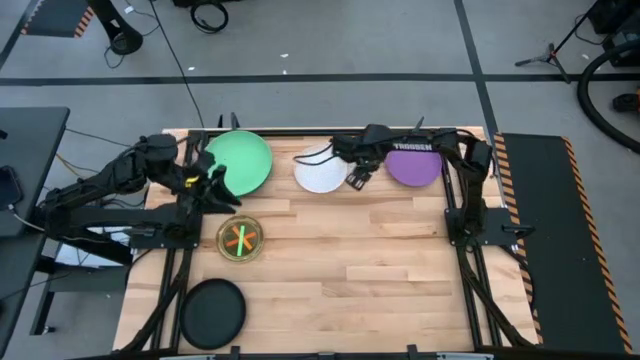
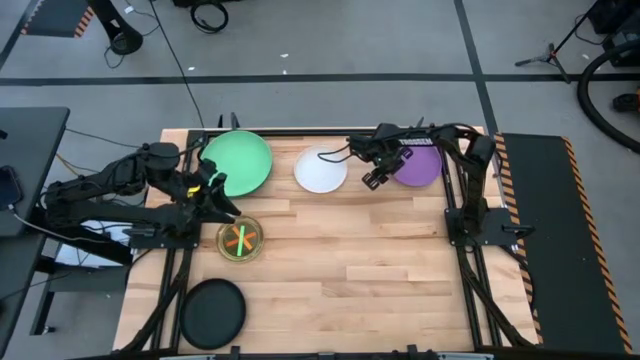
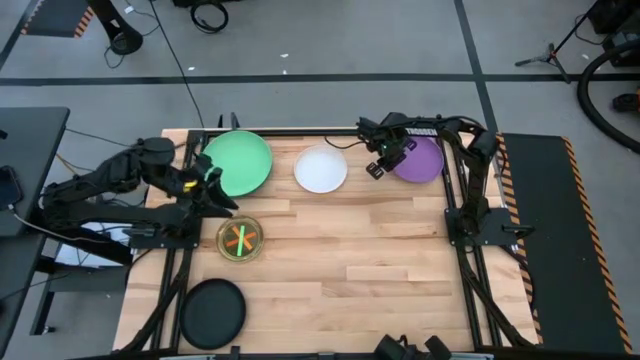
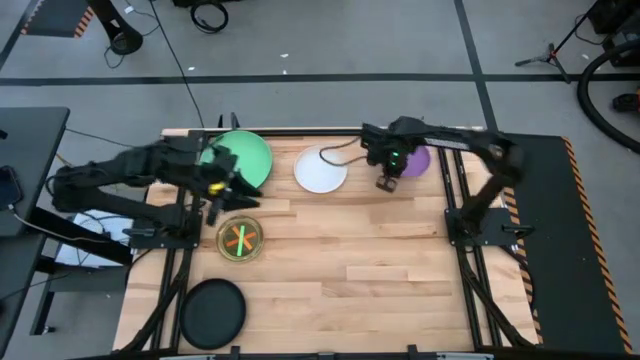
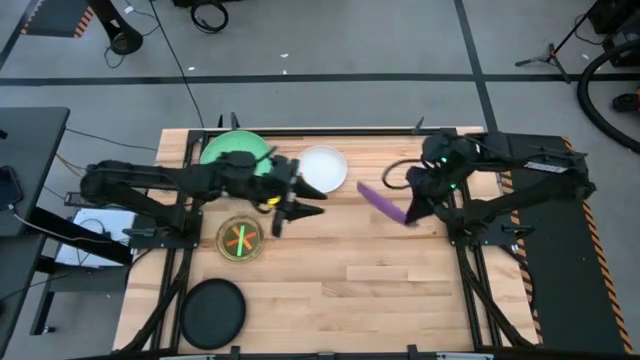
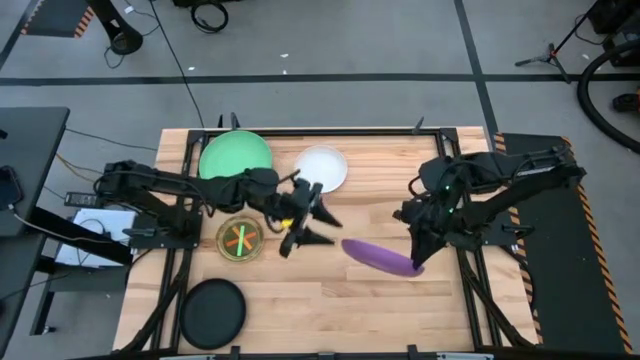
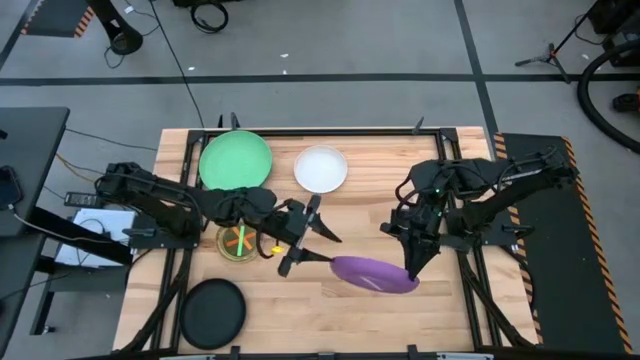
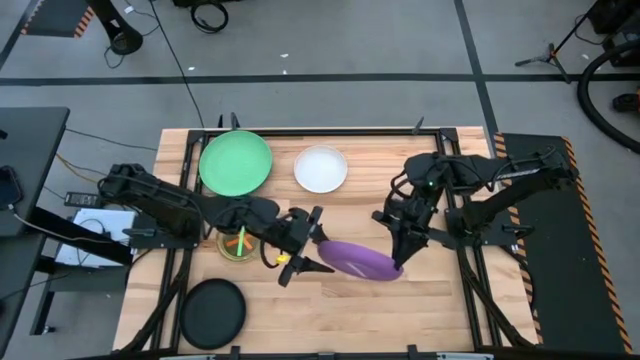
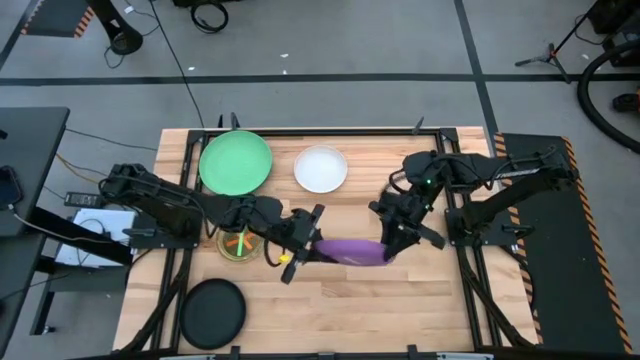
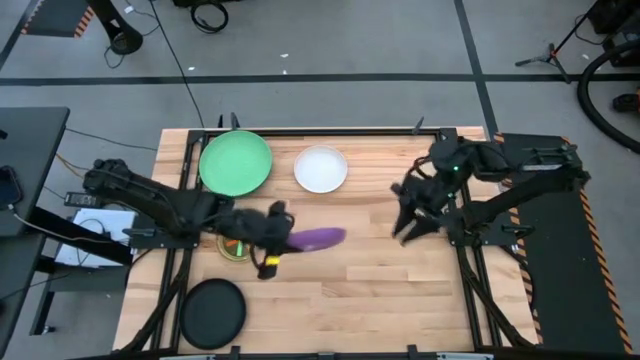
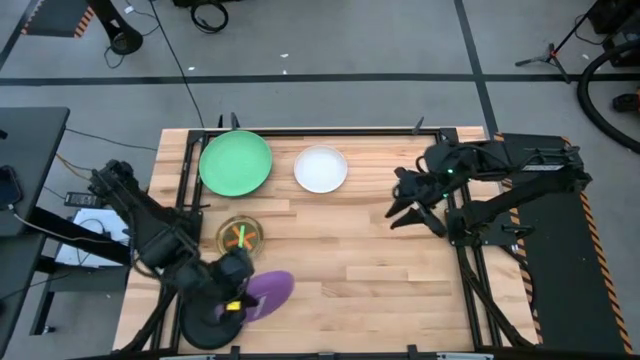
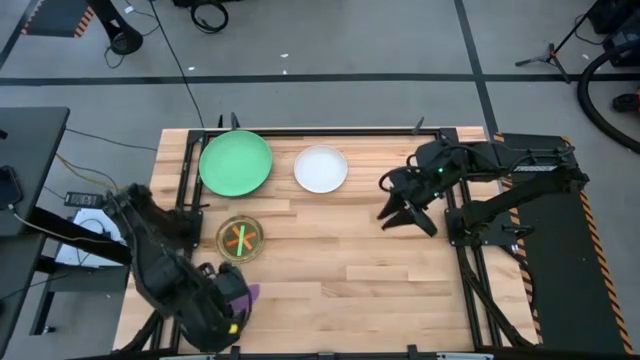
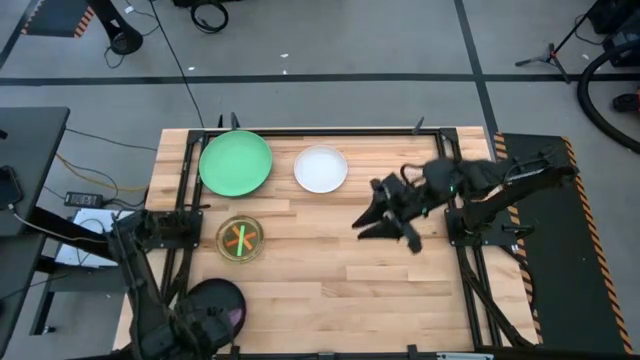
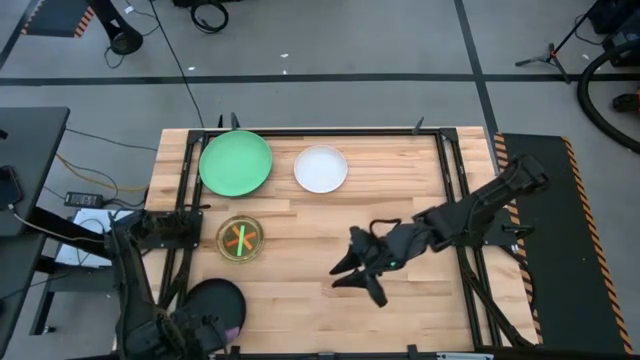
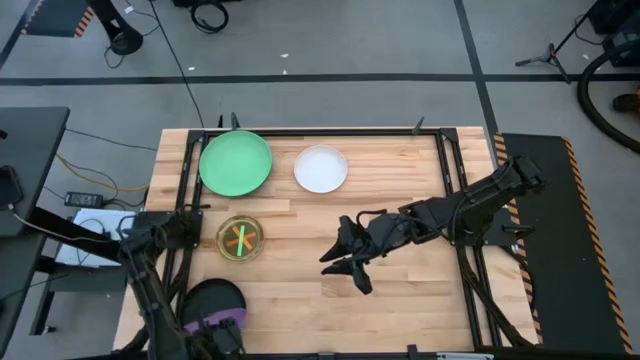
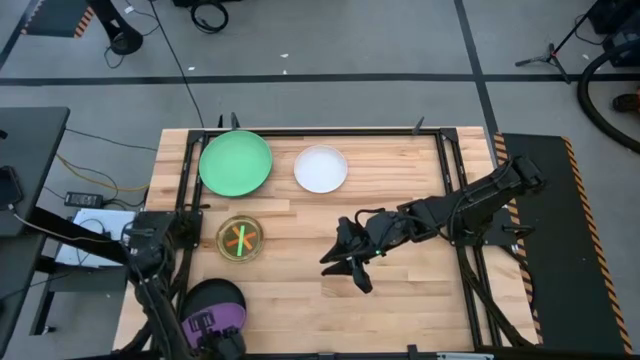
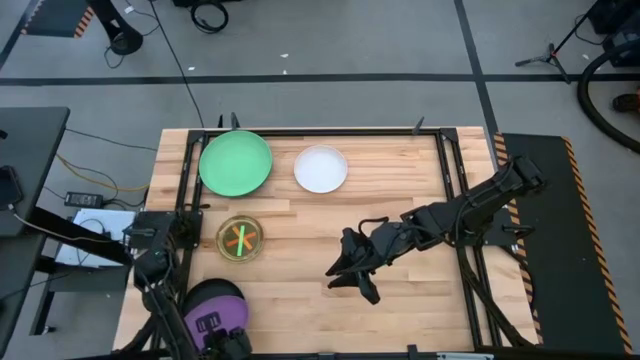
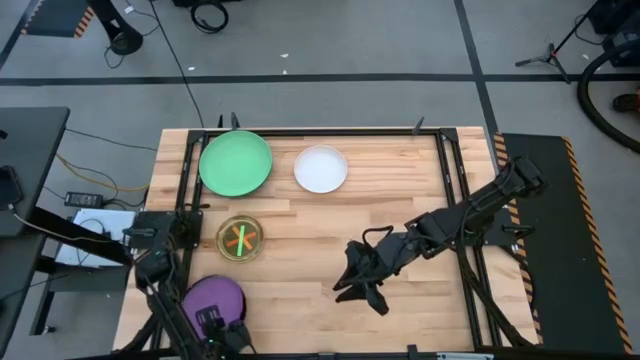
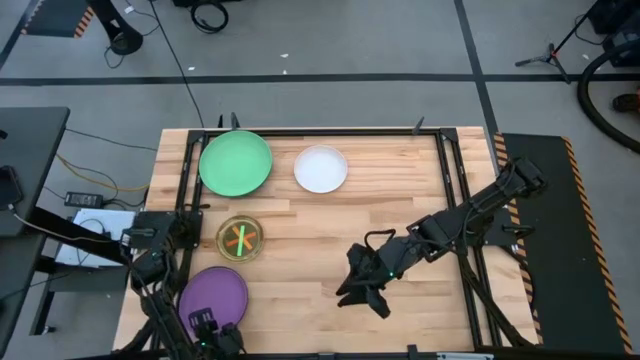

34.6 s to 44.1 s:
Task: Stack plastic plates
Stack the purple plate on top of the black plate

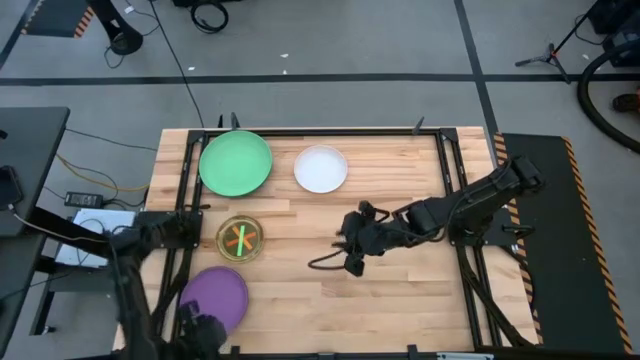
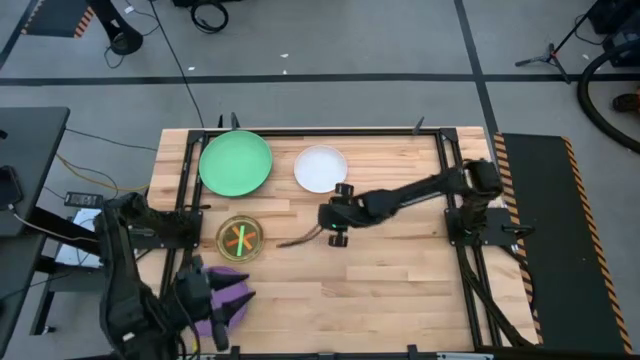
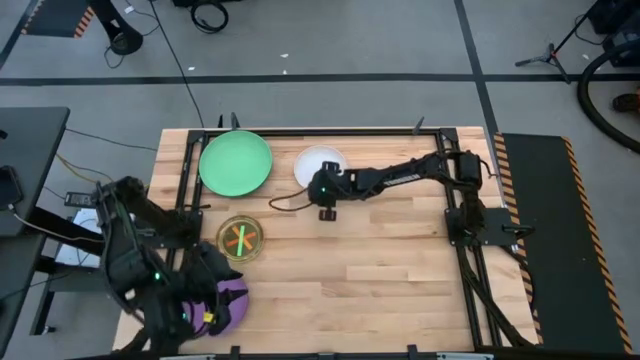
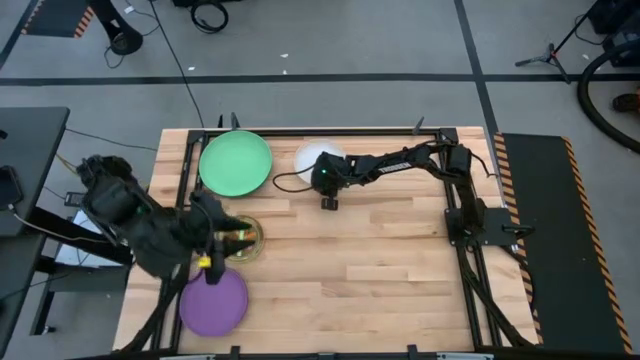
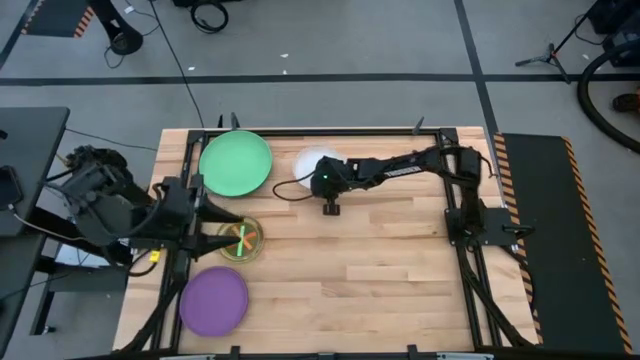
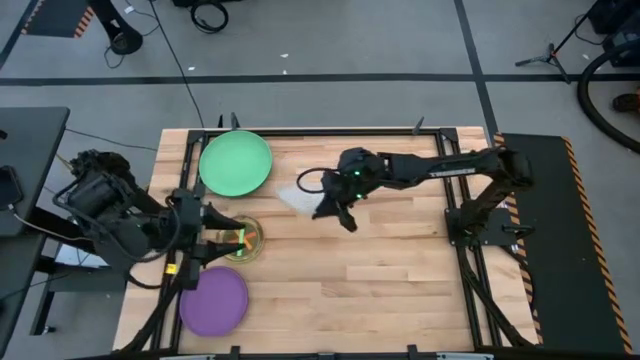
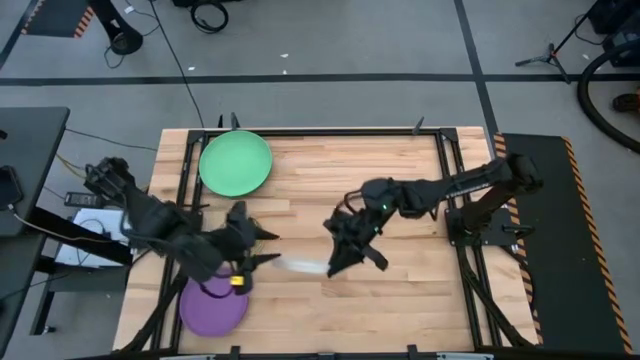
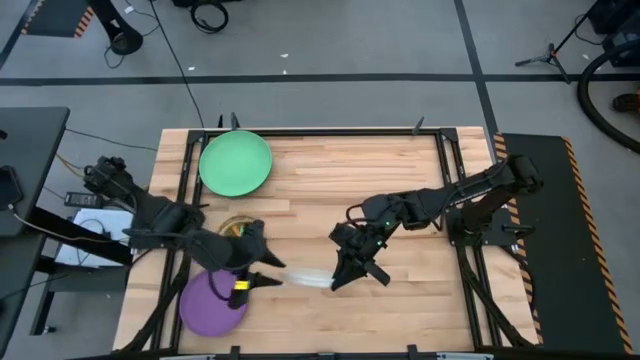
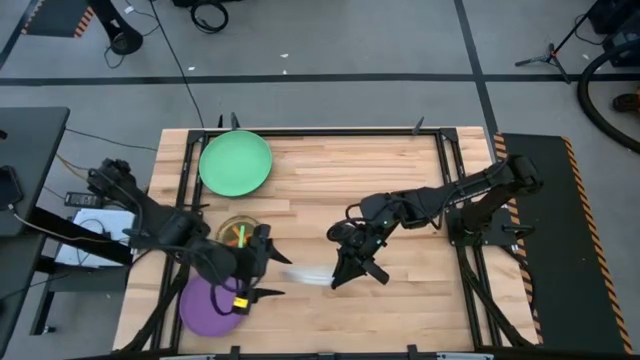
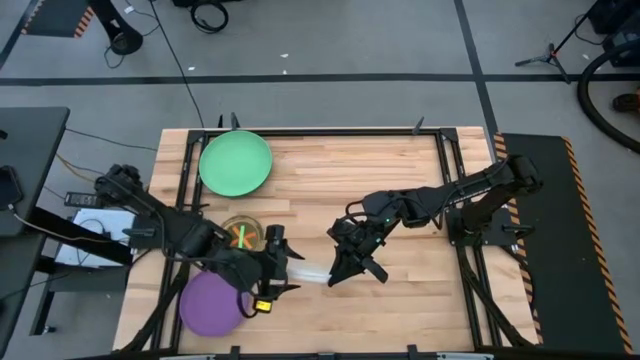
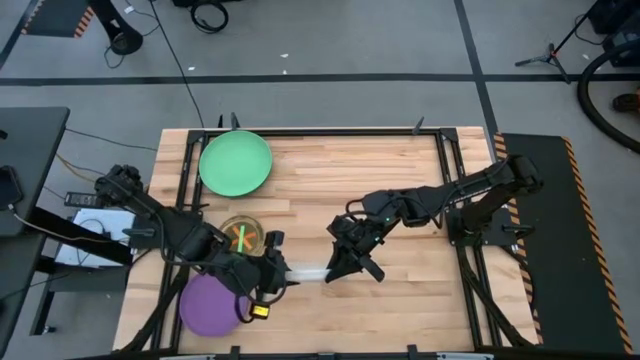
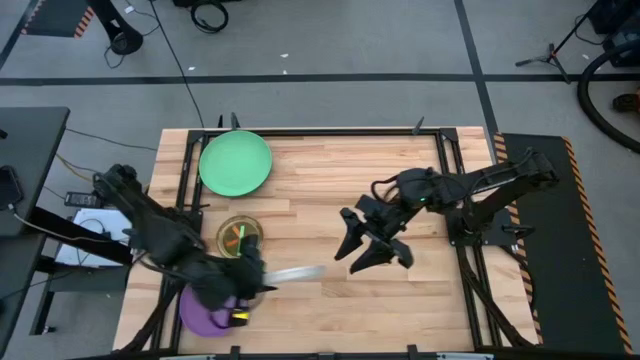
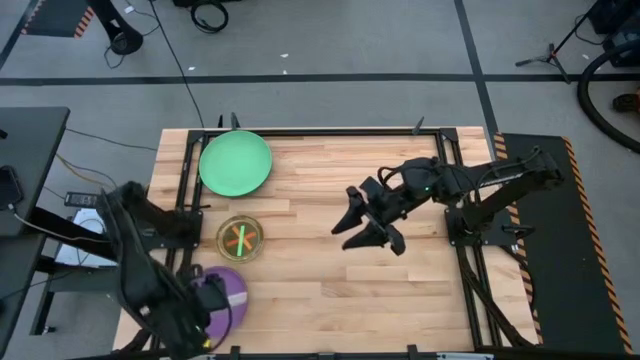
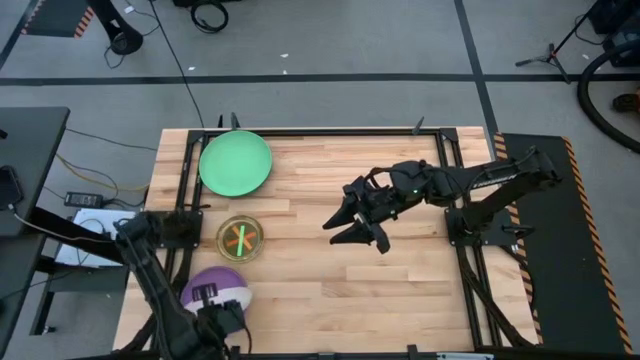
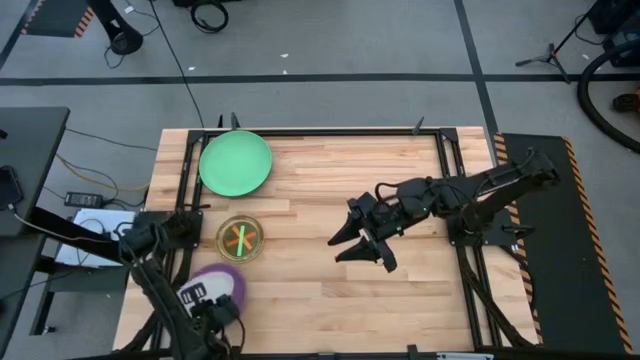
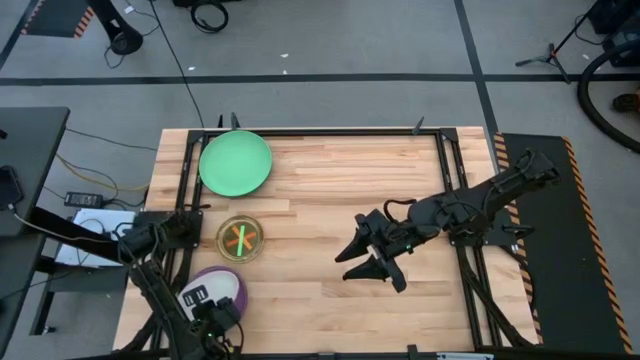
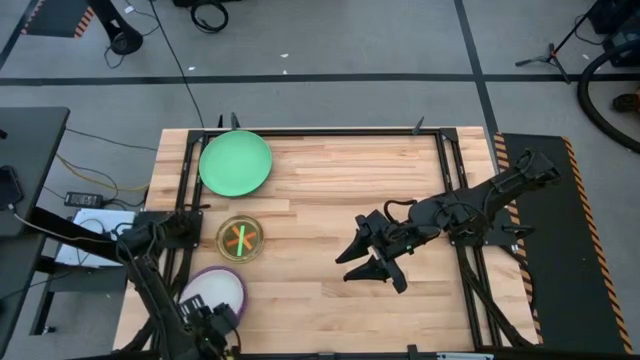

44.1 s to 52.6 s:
Stack the white plate on top of the purple plate

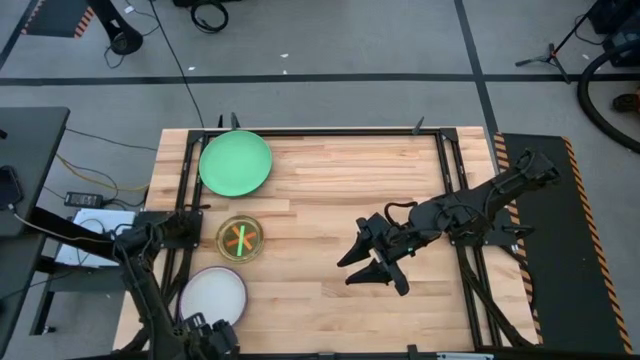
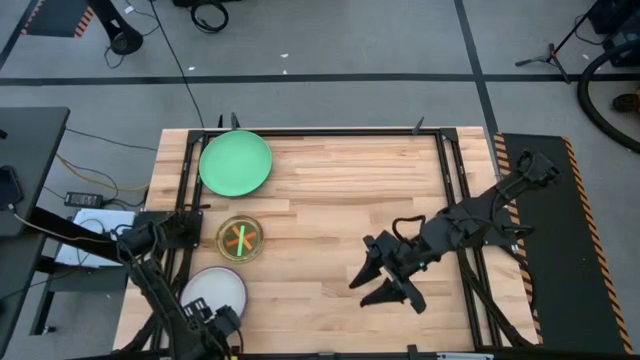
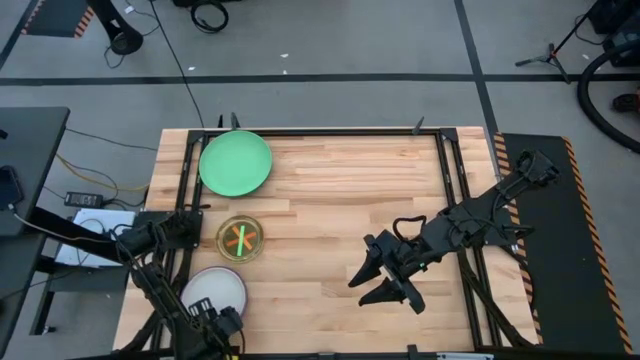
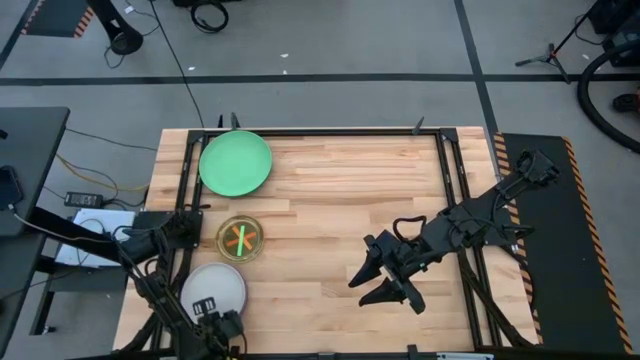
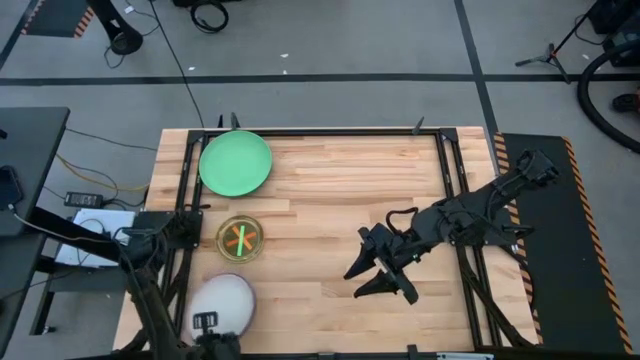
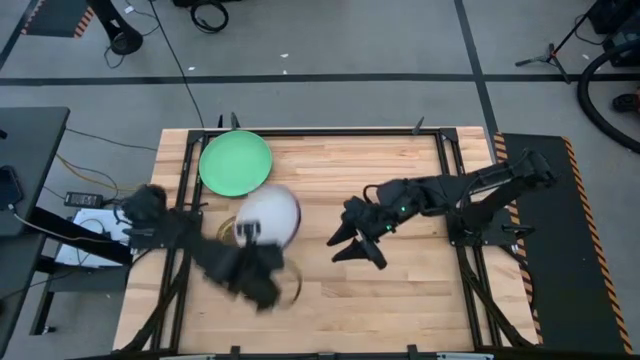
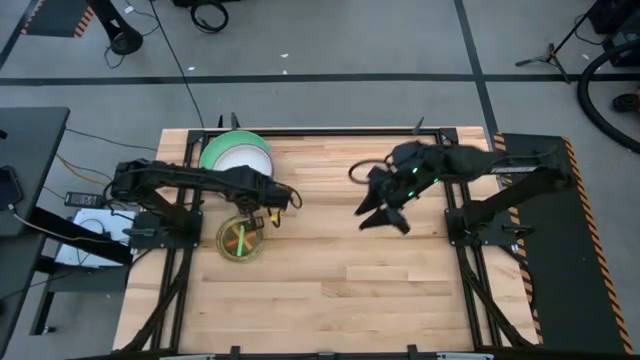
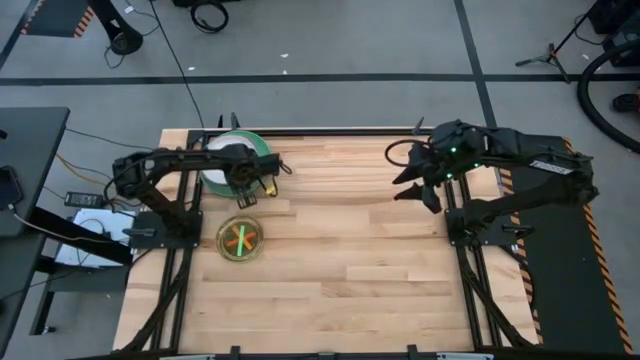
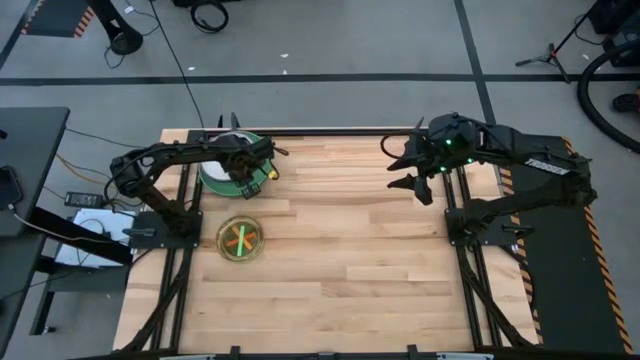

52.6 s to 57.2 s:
Stack the bottom stacked plates on top of the light green plate
